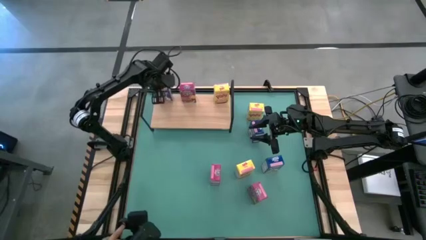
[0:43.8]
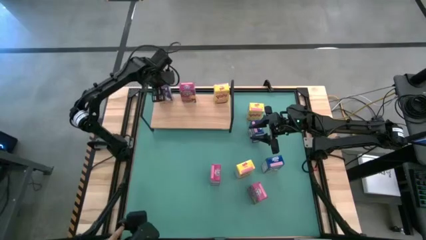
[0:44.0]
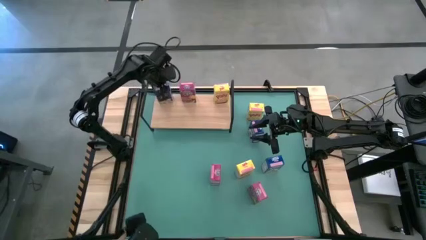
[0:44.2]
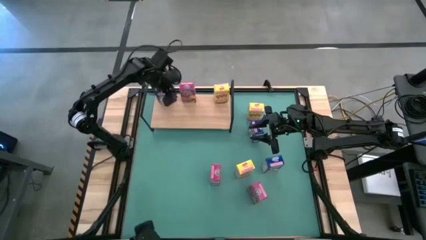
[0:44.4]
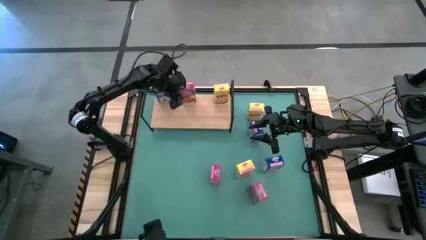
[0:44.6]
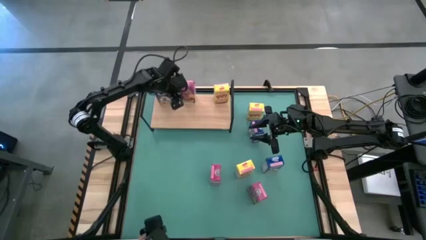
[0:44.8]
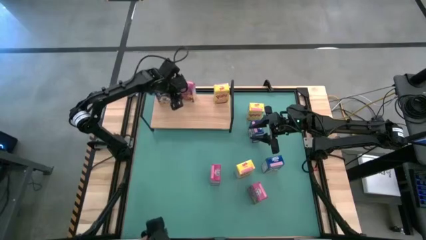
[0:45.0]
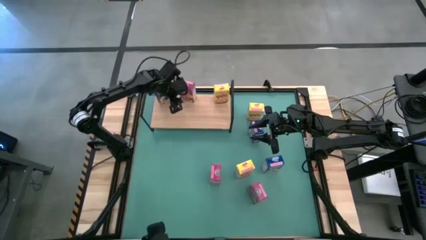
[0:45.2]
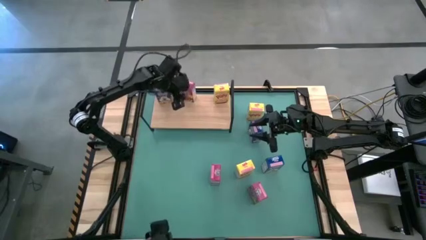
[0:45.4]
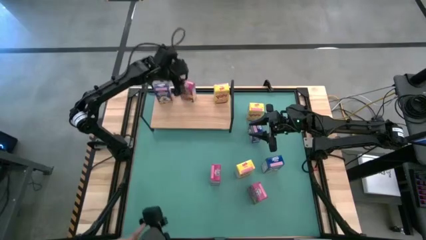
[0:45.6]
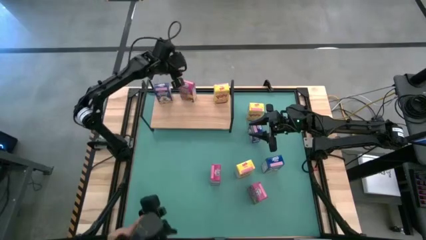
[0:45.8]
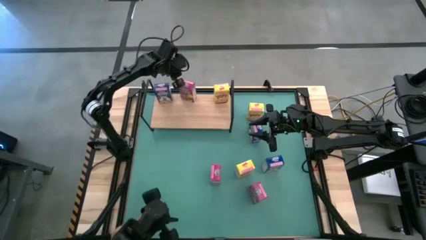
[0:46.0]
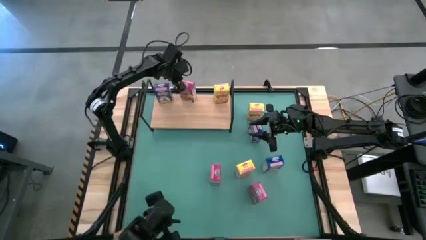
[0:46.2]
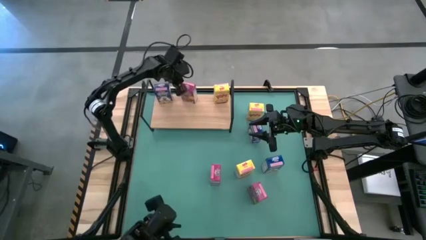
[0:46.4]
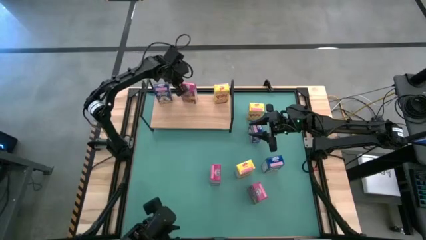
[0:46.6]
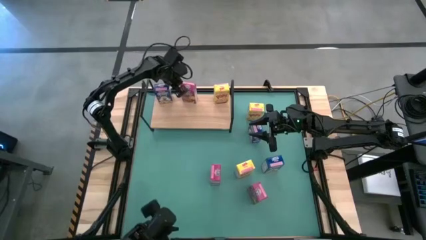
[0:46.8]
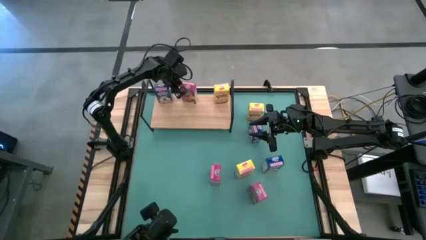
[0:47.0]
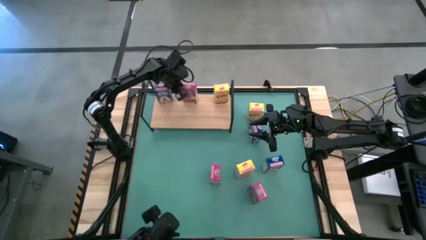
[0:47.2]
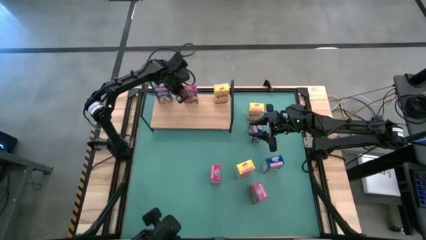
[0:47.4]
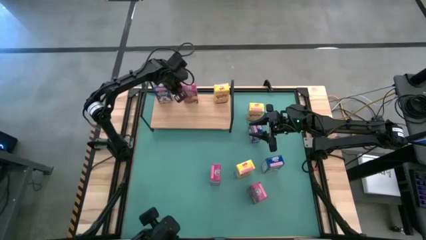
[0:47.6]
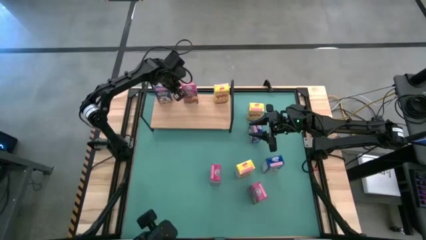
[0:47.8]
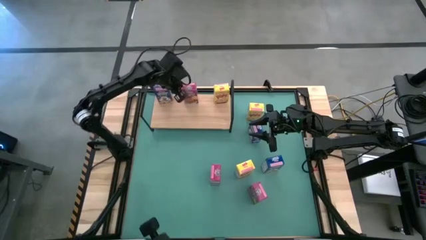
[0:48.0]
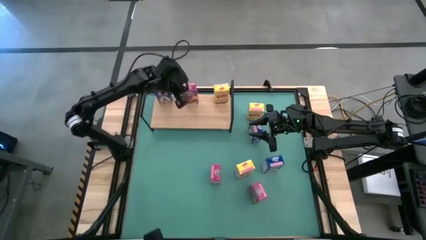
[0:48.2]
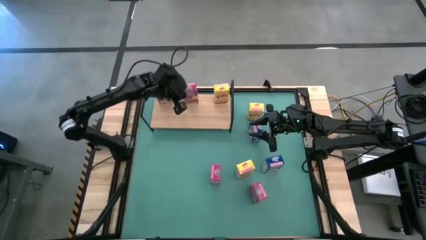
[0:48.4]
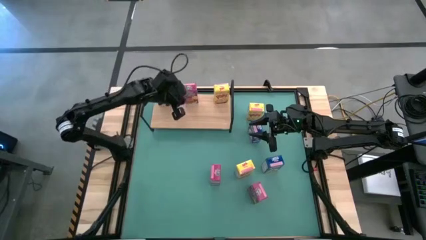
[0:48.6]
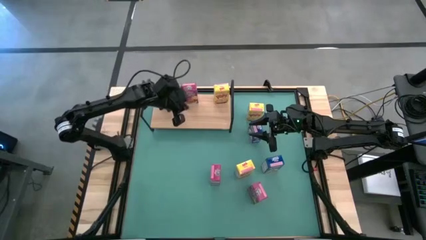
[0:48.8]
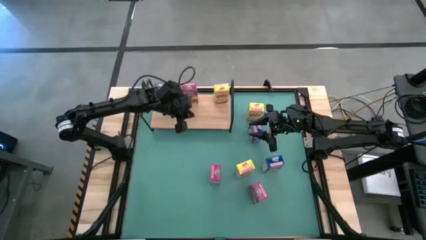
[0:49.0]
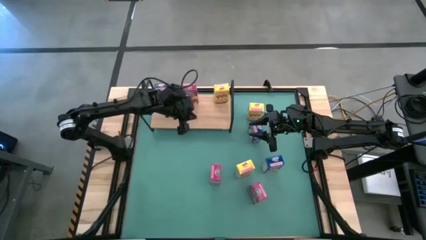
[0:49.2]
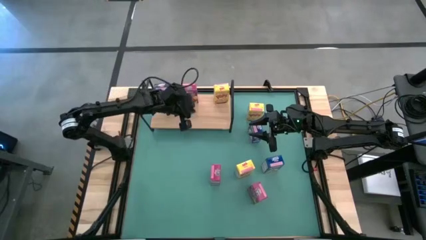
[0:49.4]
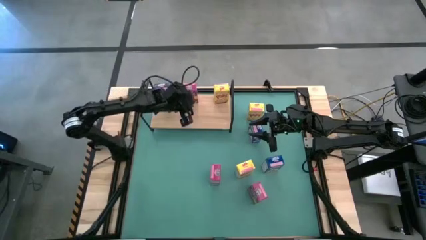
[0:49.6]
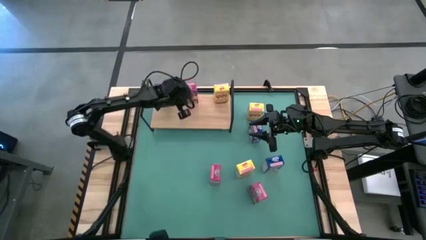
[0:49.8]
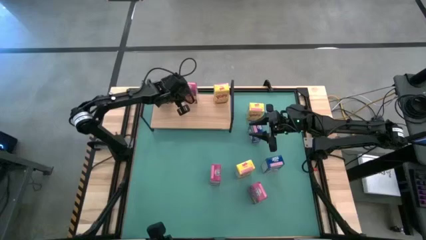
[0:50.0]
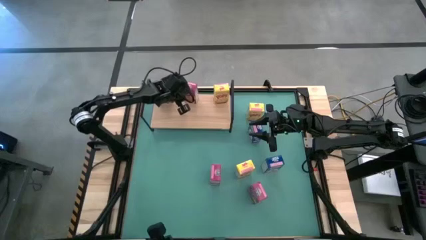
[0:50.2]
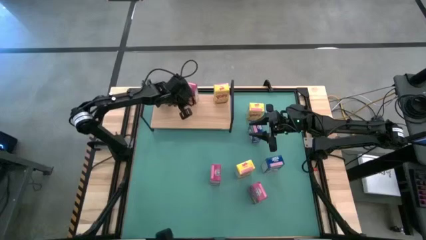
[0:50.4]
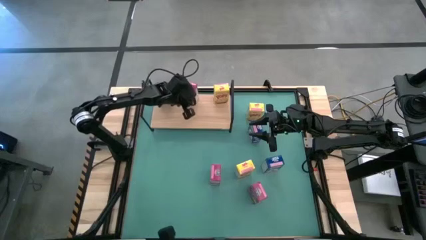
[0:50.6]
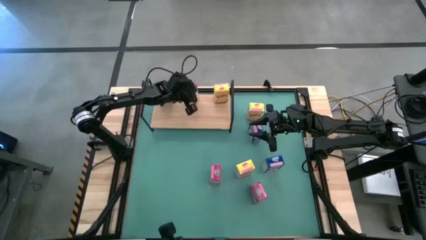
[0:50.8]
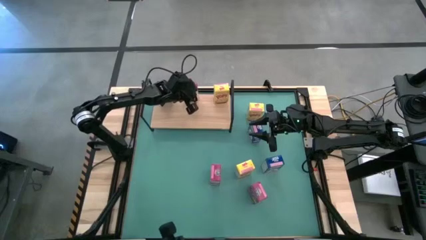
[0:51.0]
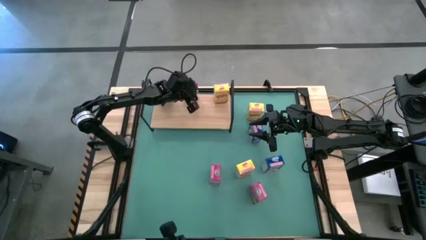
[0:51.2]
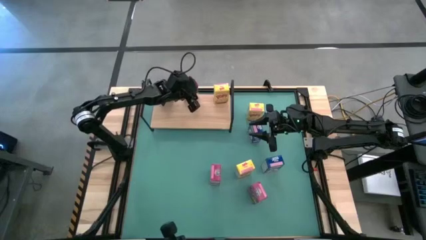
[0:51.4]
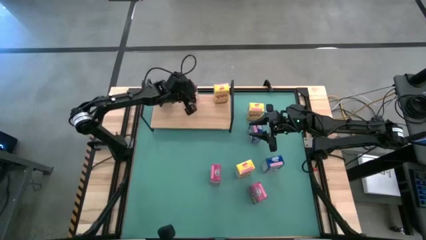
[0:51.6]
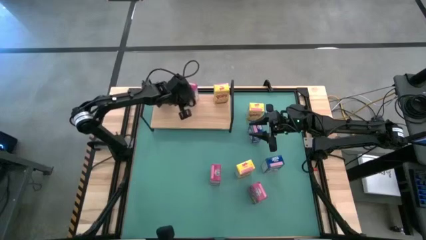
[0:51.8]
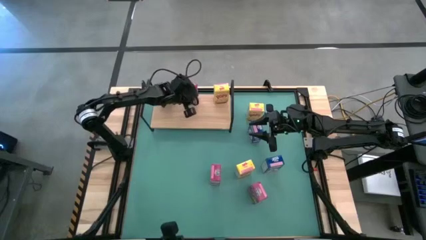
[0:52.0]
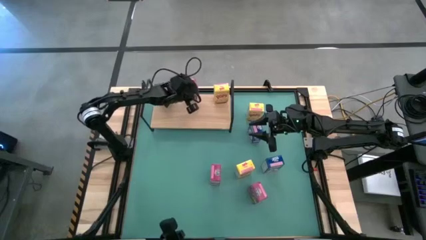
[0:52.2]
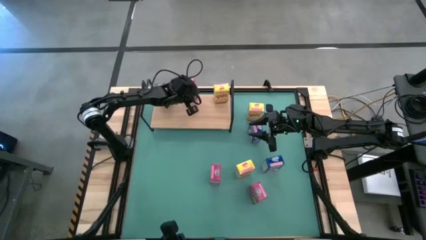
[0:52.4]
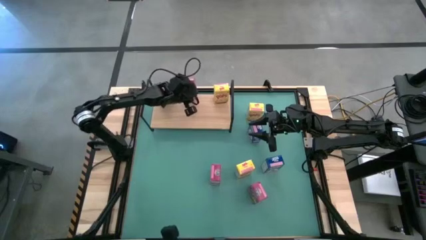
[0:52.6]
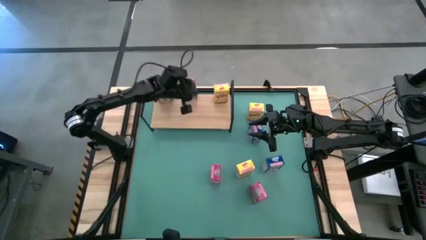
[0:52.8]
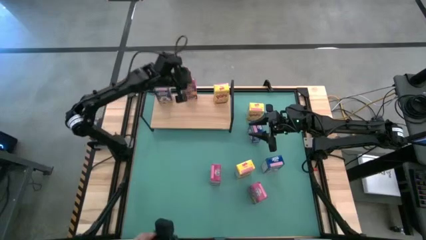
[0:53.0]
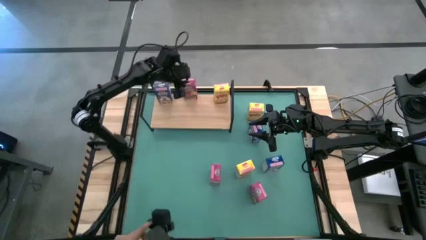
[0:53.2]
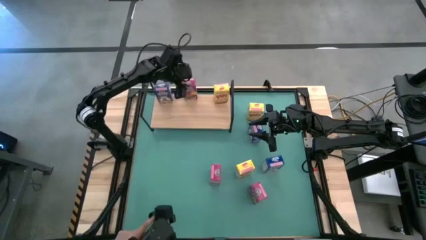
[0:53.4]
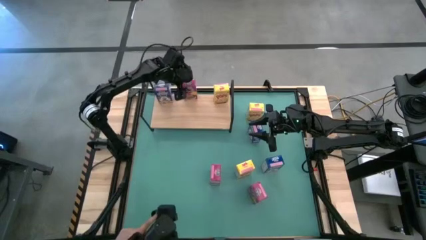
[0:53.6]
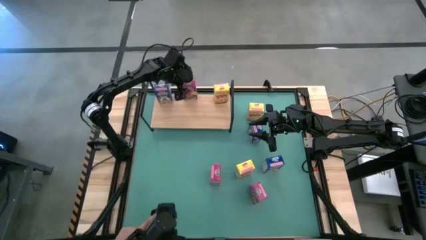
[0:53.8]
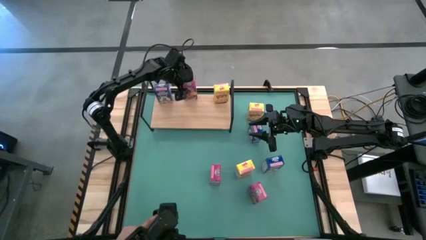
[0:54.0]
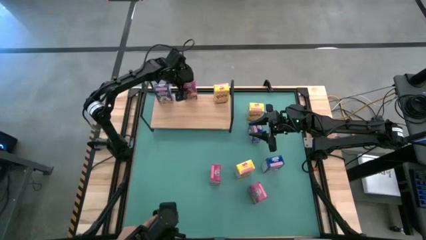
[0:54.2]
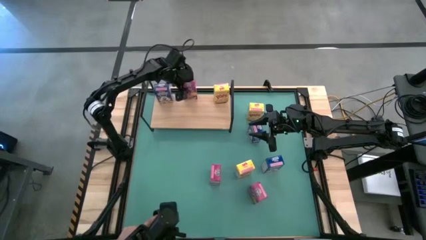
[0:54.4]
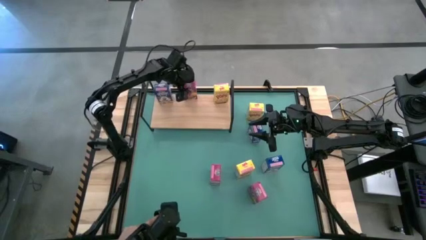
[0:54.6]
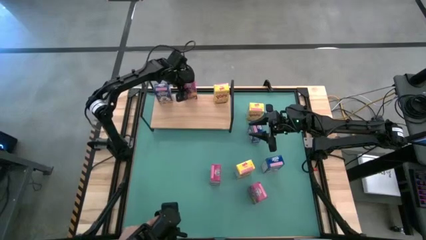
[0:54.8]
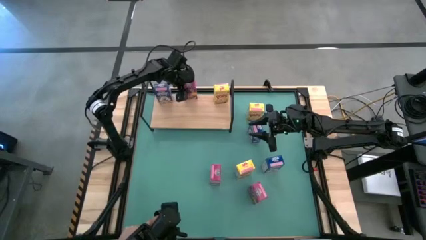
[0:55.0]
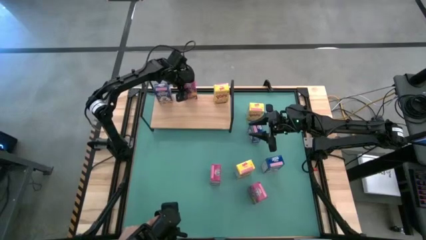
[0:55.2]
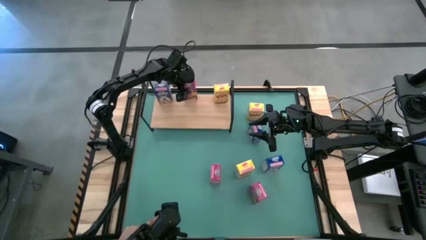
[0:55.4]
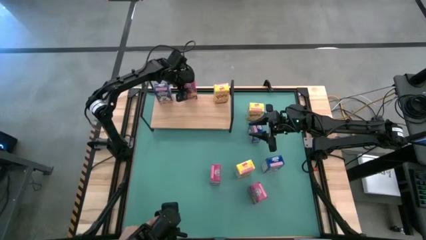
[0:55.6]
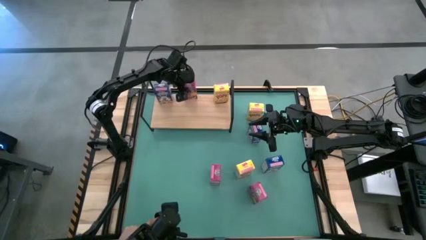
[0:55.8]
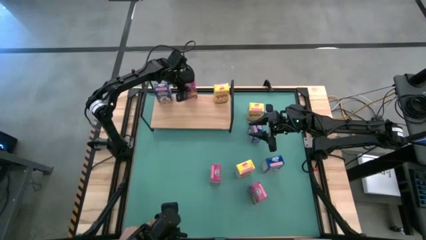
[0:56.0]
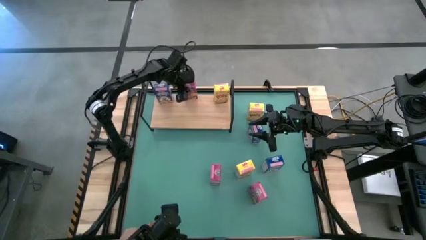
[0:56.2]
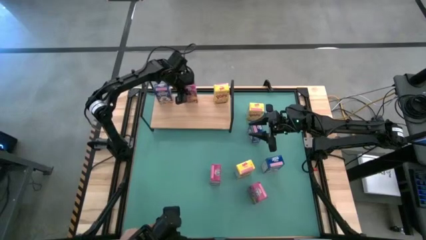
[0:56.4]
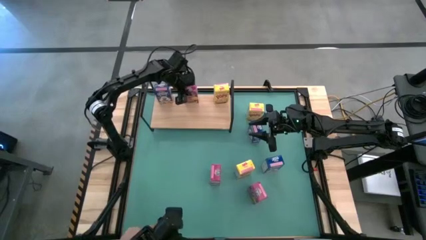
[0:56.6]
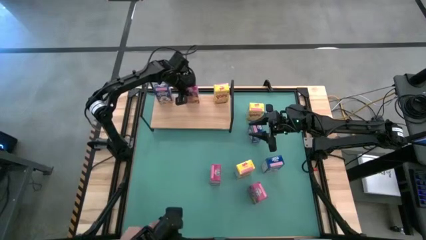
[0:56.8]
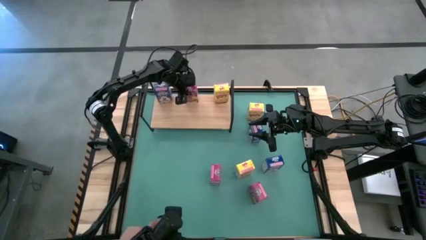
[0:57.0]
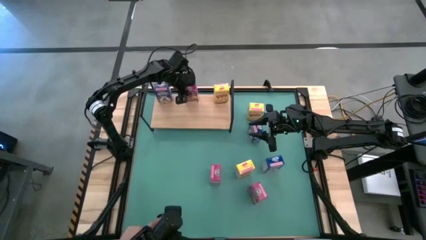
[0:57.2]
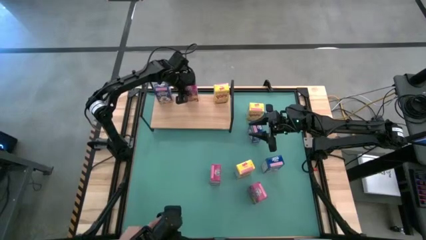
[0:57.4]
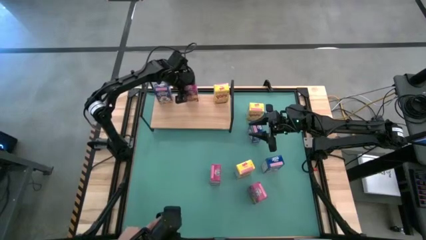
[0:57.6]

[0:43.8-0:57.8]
Task: Stack cereal on shelf
Adjust the pink cereal box on the shelf

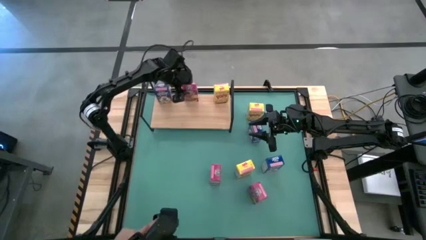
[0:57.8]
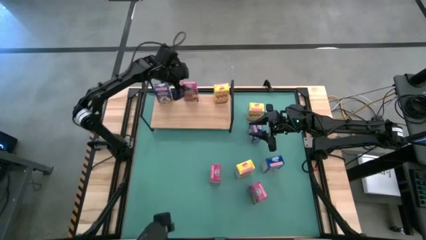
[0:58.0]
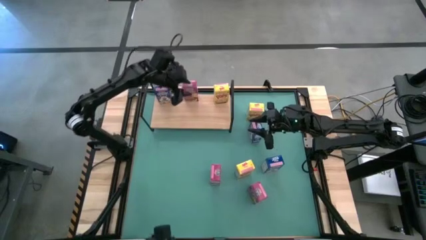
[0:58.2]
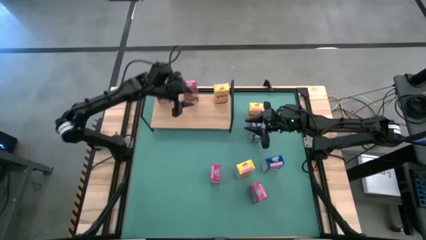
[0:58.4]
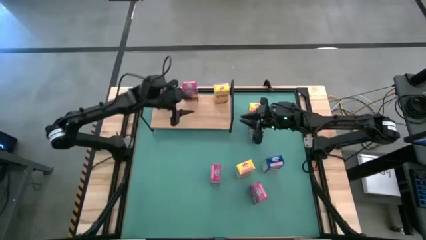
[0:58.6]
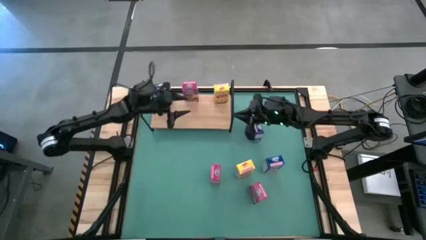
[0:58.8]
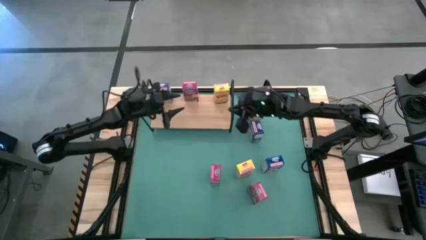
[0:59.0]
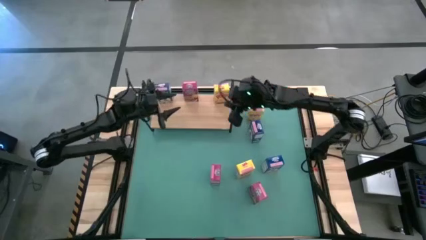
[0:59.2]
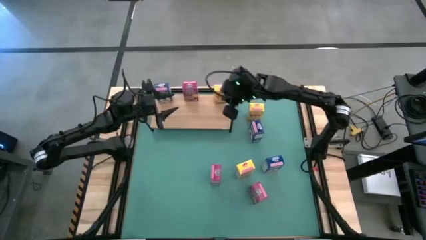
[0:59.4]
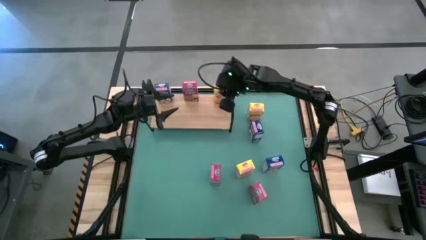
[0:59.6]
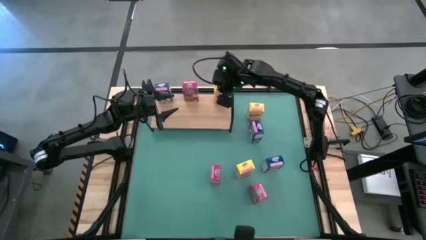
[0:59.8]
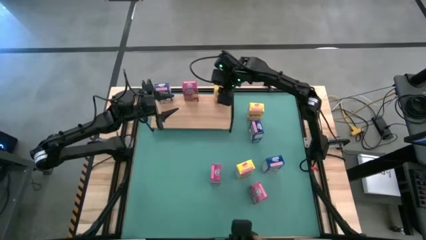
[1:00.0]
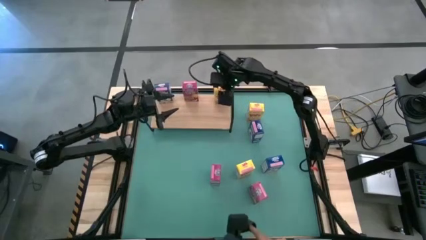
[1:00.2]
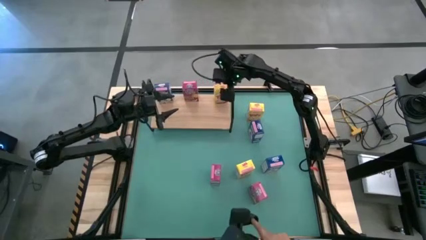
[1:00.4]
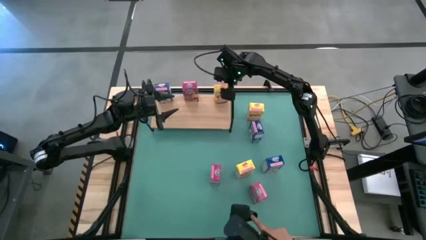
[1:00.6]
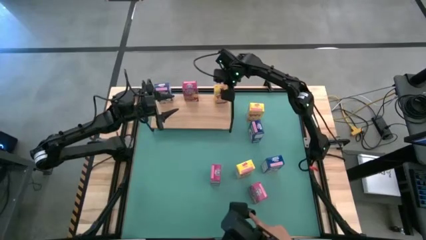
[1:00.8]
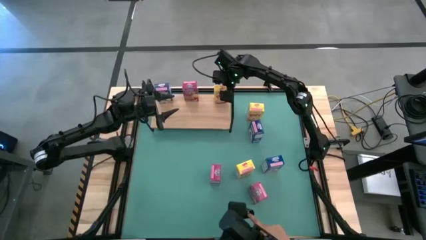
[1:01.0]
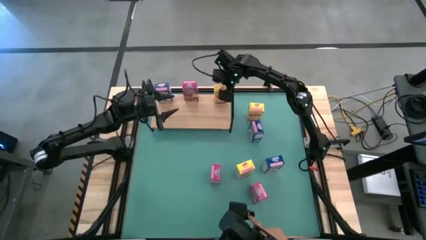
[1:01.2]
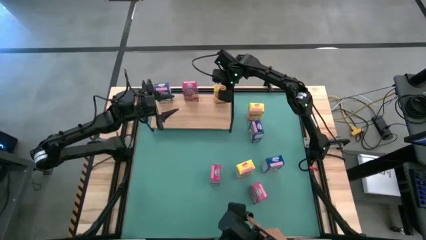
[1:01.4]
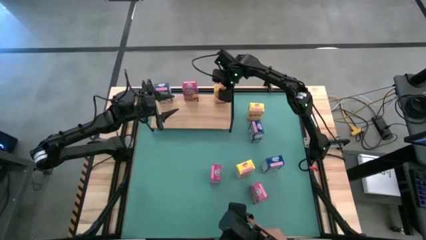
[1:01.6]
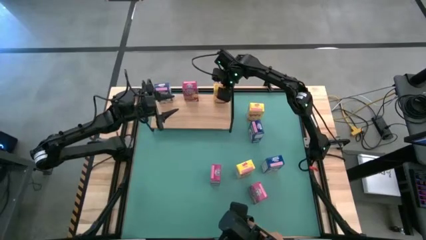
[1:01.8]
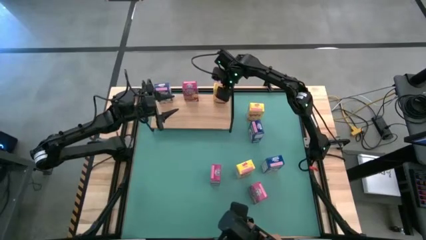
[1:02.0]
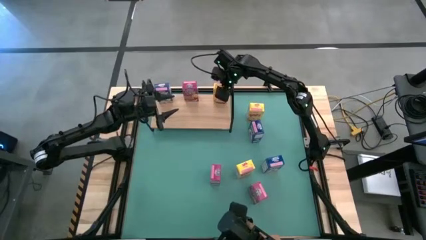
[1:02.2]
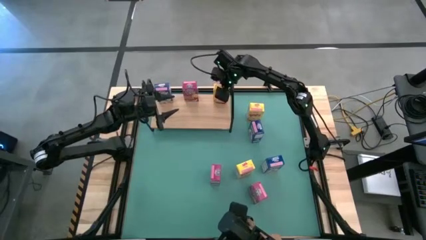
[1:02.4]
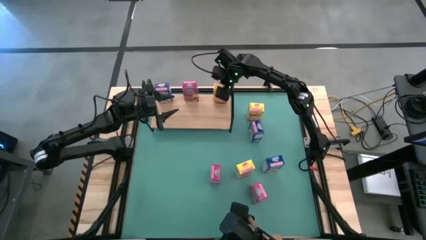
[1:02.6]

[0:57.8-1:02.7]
Adjust the yellow cereal box
